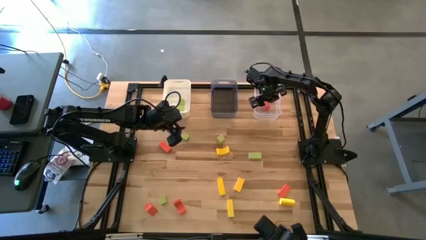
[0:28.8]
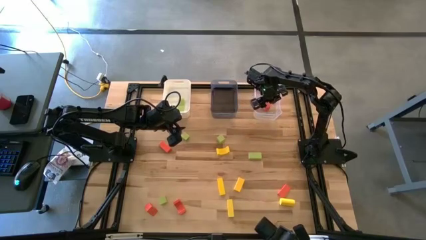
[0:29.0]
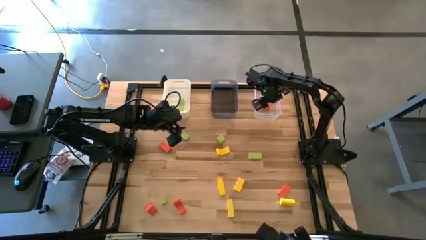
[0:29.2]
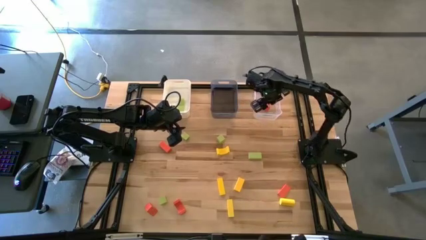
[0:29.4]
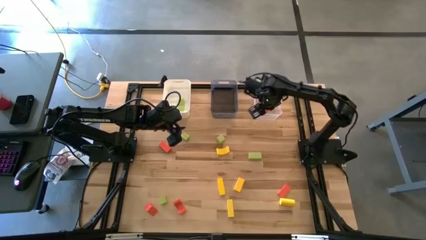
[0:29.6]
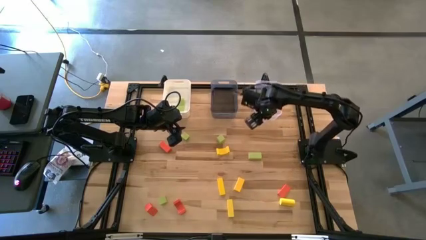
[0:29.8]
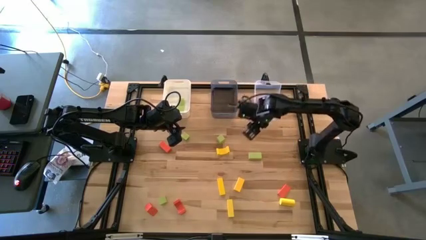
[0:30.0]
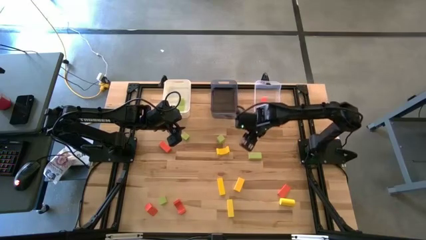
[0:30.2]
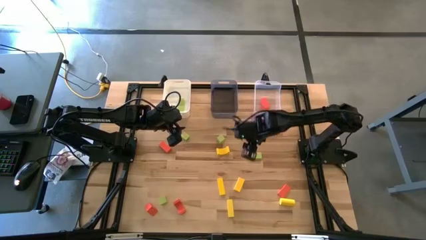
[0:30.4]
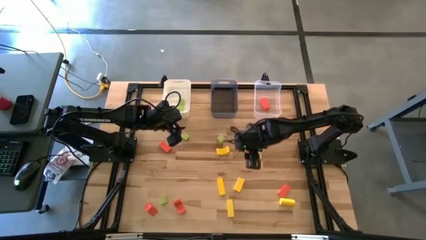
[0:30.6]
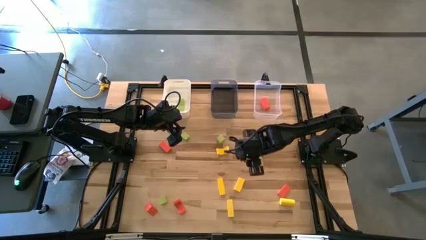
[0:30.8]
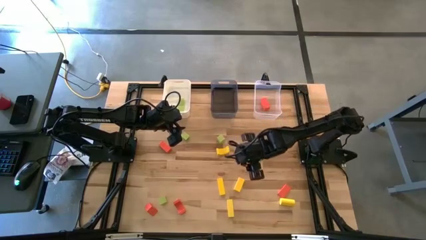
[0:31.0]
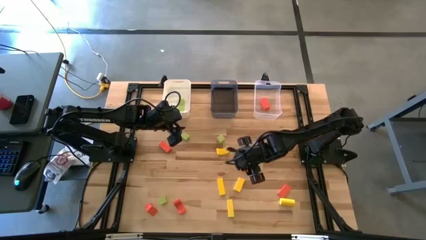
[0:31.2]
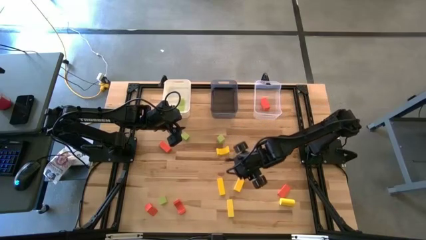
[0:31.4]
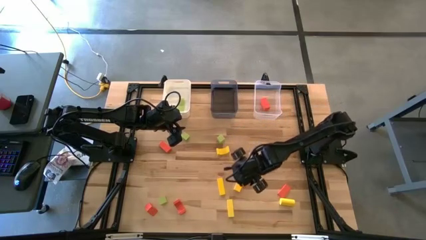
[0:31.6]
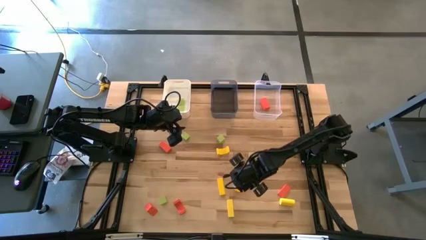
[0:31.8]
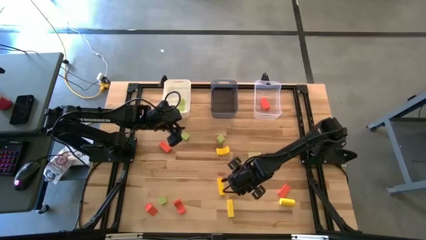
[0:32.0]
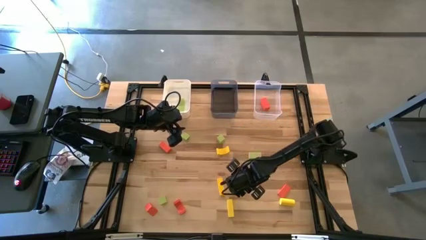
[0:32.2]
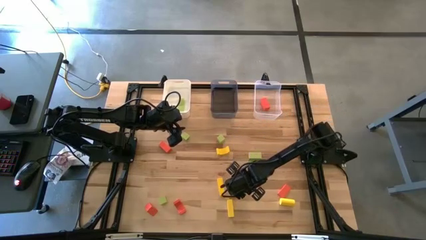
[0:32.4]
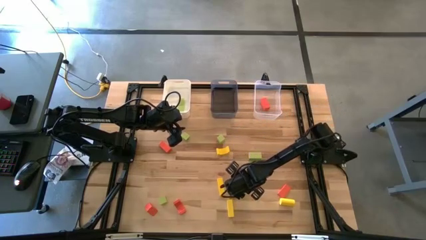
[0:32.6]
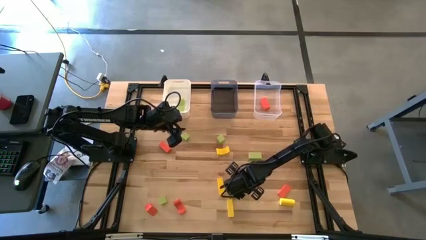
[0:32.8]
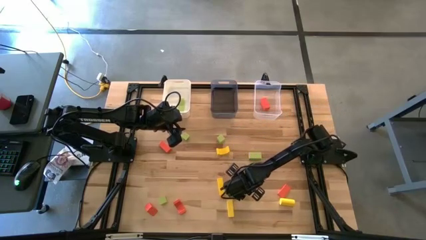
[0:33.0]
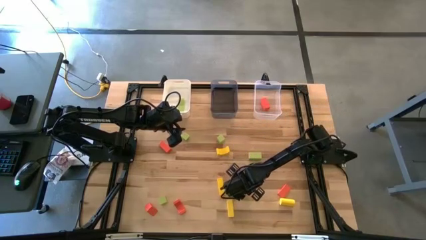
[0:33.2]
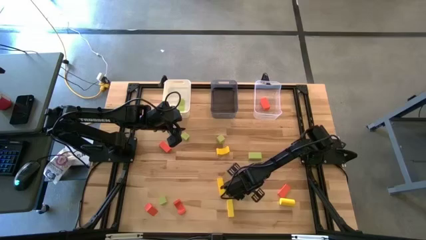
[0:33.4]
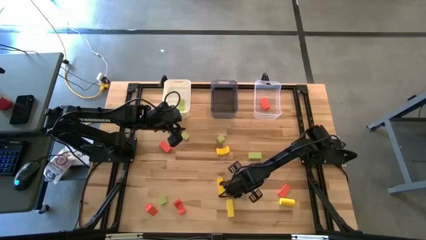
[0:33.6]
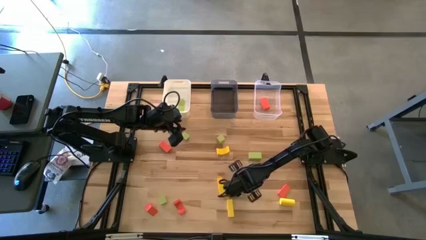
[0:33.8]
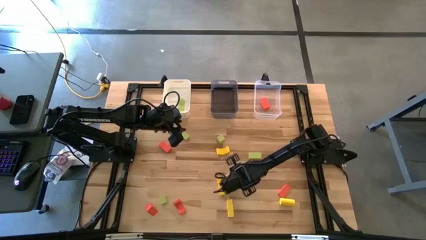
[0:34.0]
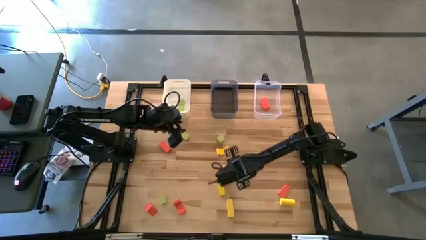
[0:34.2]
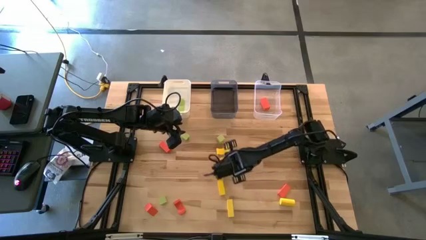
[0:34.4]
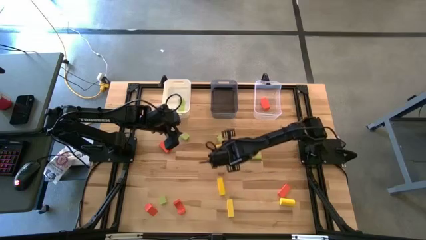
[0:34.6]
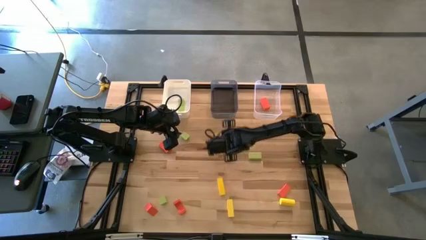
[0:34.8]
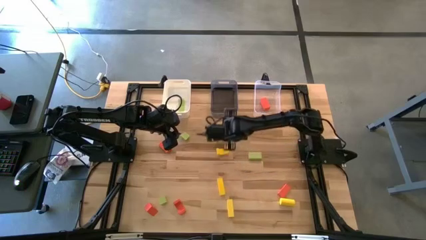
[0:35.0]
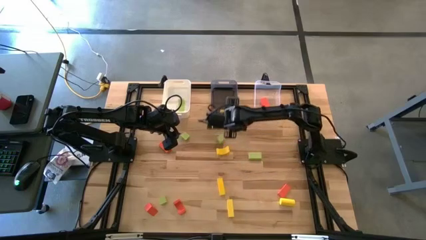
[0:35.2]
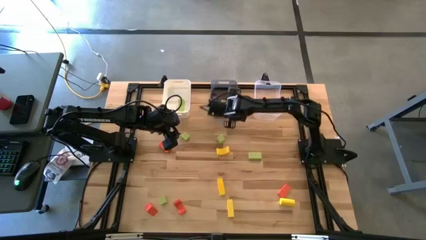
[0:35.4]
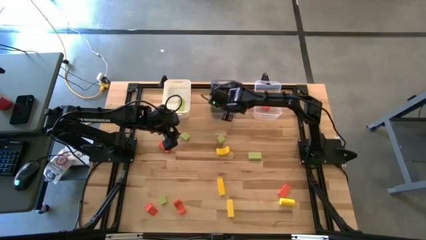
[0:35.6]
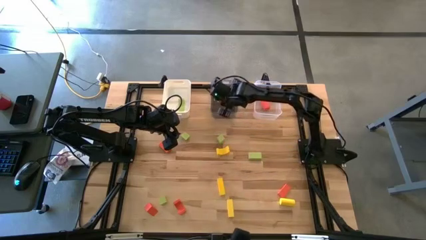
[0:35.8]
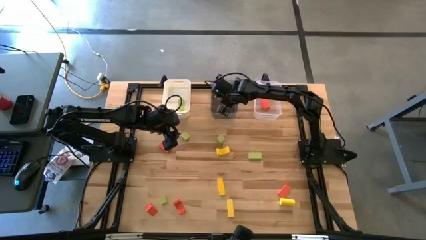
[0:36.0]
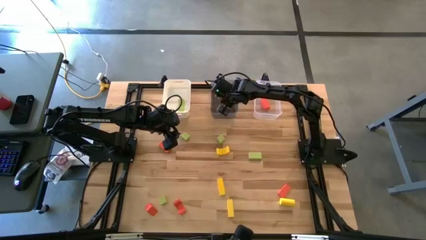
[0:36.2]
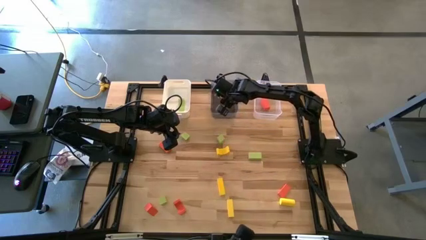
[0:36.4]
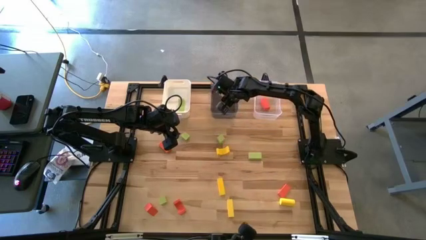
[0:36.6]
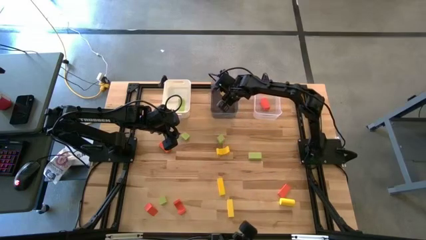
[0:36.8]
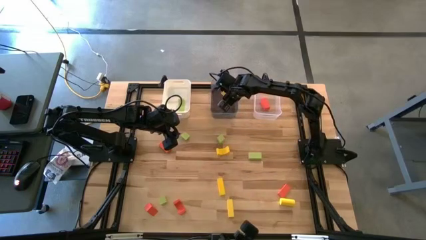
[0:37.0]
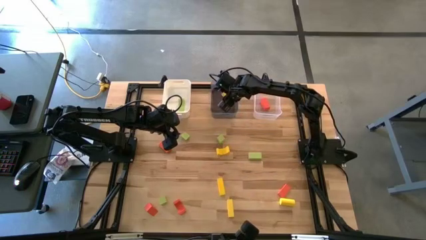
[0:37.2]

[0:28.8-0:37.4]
Task: Sort & place blocks by color
Put the yellow block into the black bin

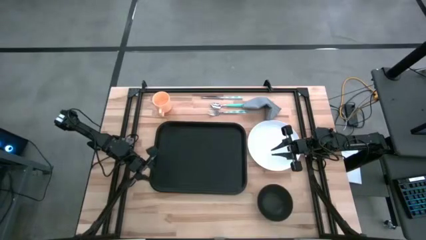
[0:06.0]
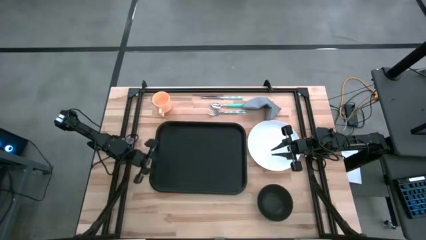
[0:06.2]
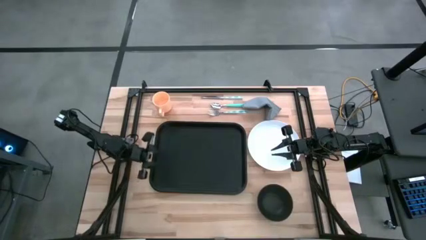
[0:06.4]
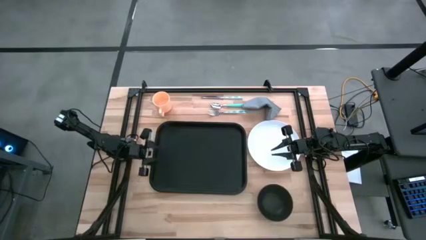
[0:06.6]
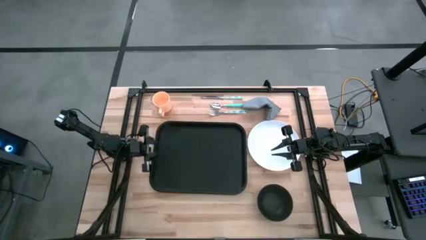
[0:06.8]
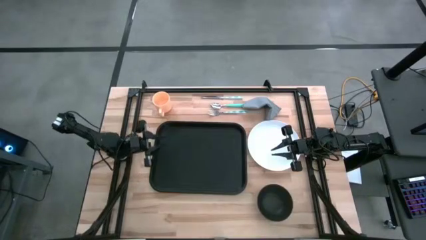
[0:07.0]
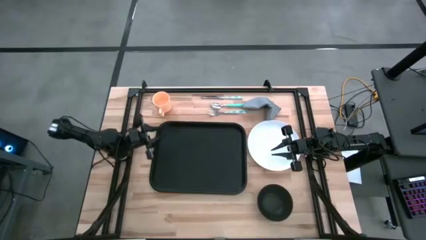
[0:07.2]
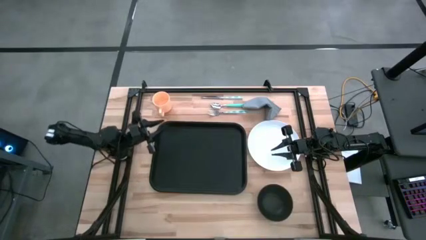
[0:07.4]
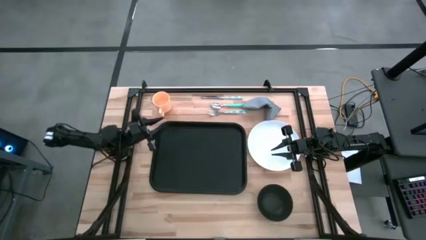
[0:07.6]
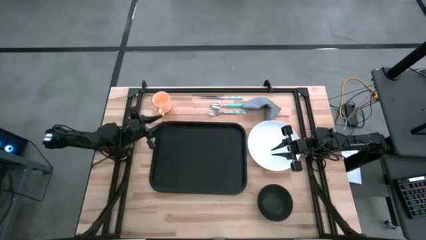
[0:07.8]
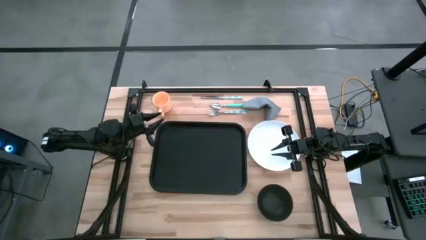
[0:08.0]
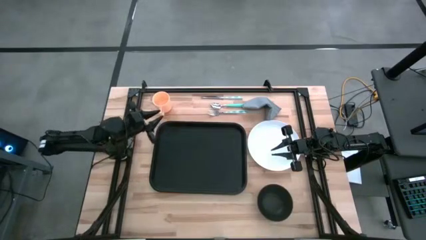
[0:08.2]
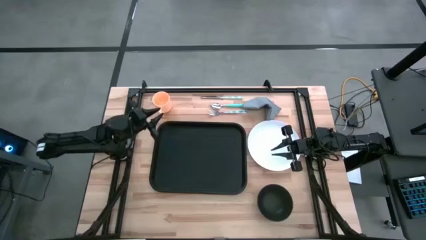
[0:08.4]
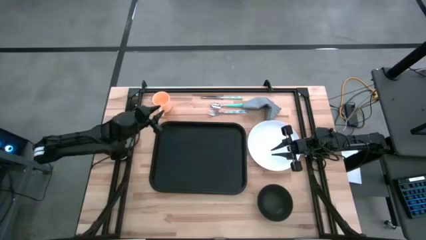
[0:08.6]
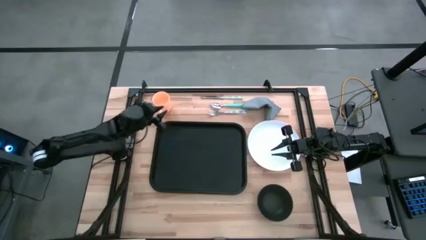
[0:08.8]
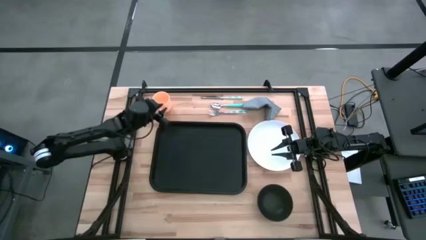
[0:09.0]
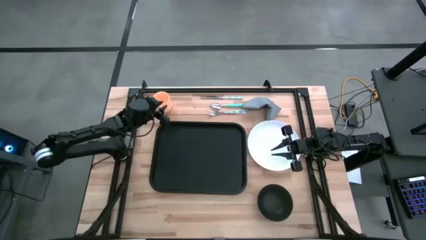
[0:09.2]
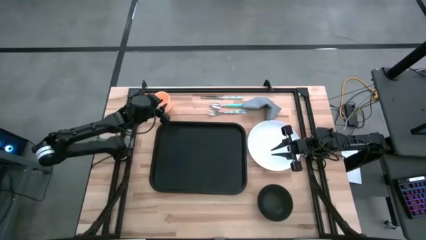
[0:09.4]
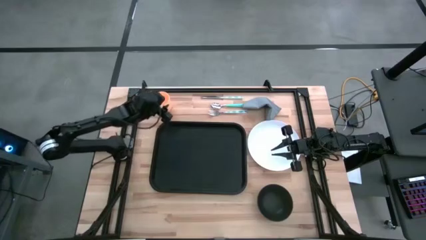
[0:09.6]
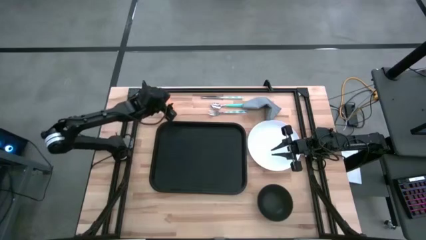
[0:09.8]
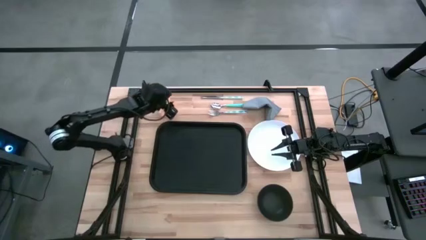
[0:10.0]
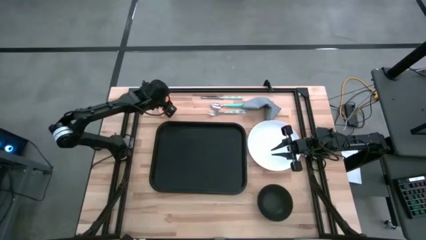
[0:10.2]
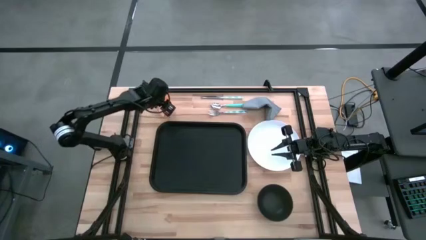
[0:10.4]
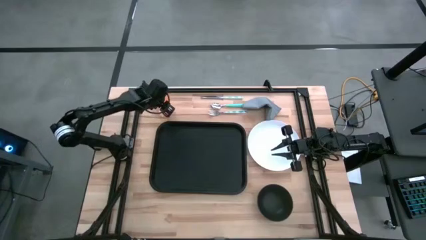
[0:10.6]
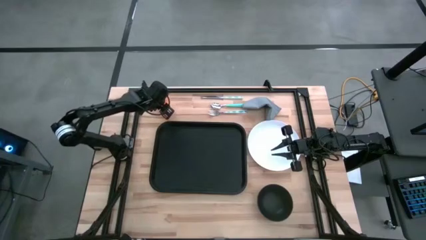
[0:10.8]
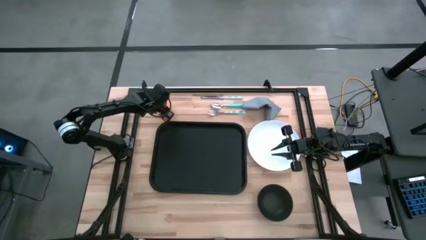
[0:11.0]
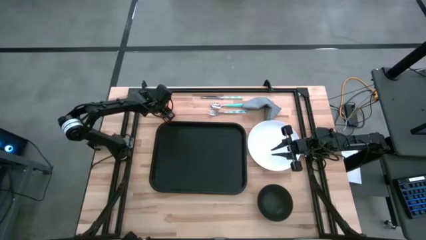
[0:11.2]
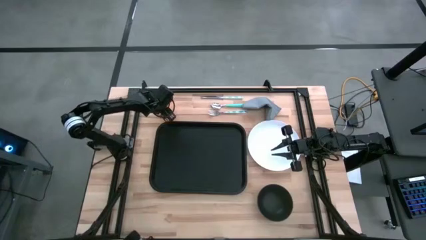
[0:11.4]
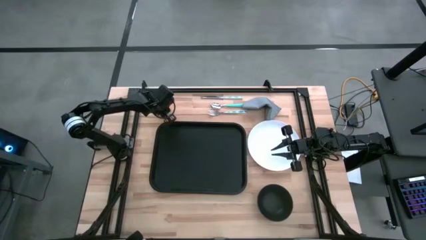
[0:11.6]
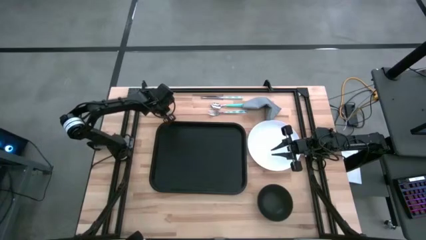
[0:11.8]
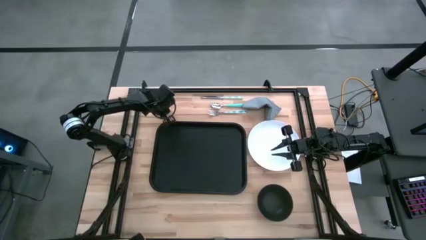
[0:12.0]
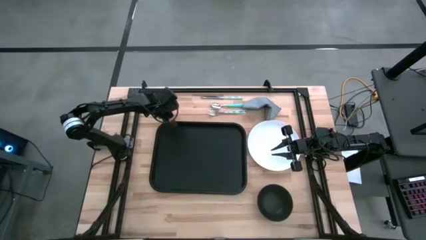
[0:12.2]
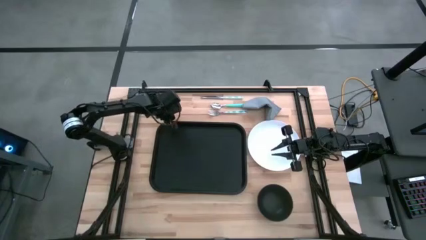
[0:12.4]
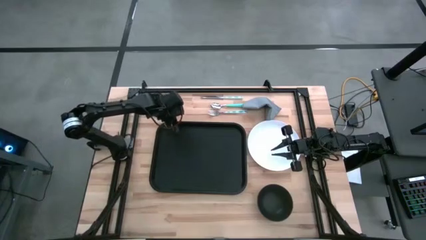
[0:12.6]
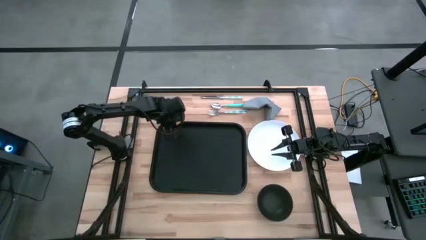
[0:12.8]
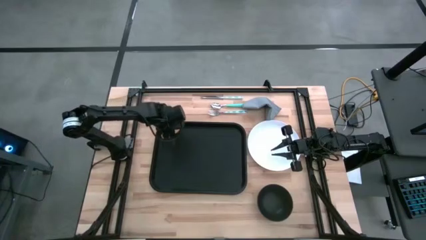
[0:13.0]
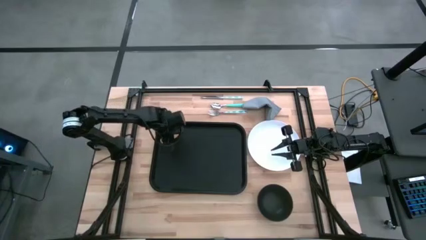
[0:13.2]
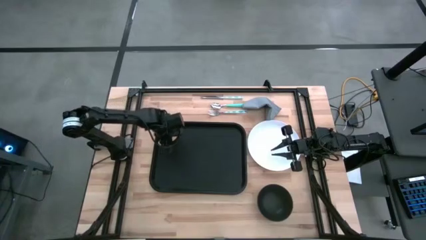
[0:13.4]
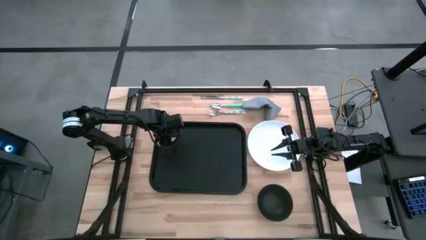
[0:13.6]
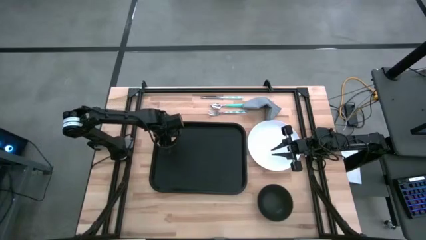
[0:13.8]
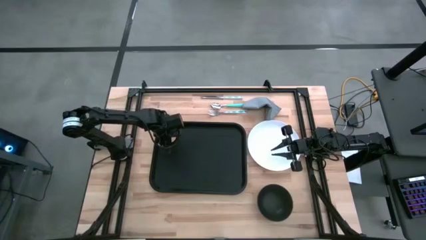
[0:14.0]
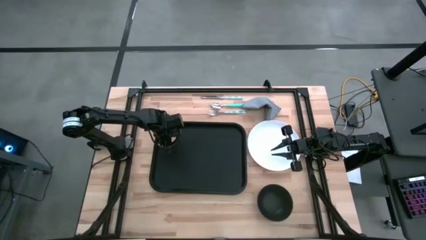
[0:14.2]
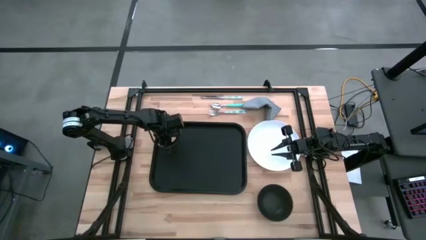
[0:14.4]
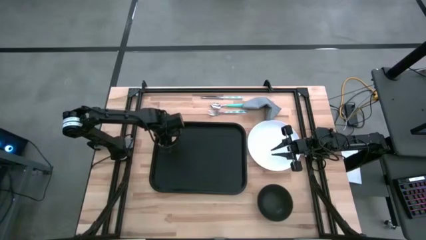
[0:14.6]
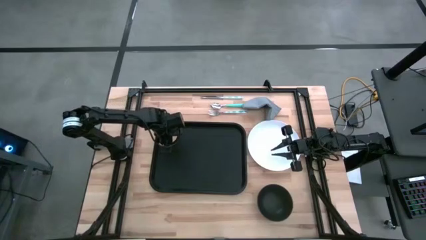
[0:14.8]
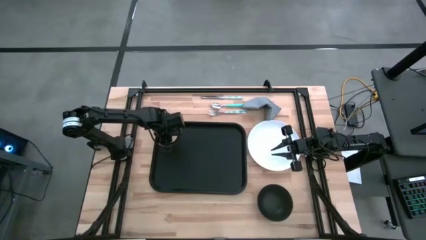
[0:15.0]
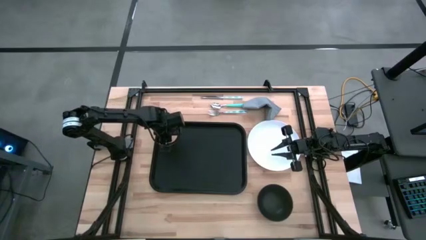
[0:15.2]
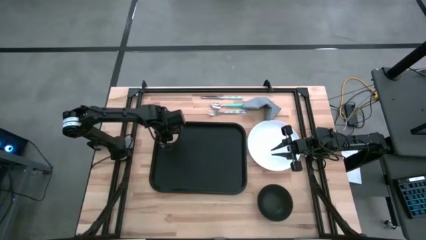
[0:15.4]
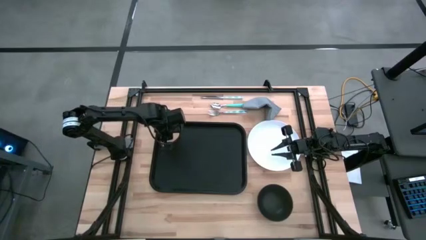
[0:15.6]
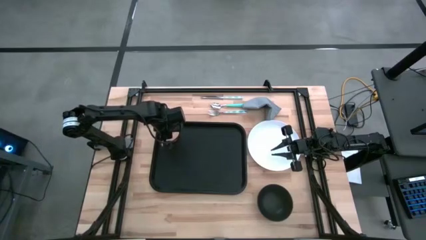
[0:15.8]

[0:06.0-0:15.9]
Task: Set up tray
Put the yellow mug on the black tray
